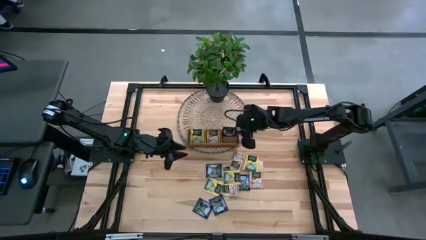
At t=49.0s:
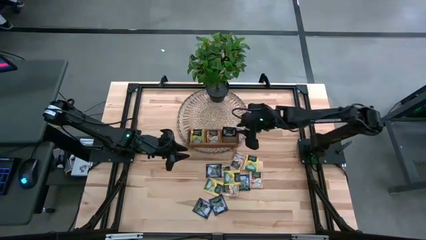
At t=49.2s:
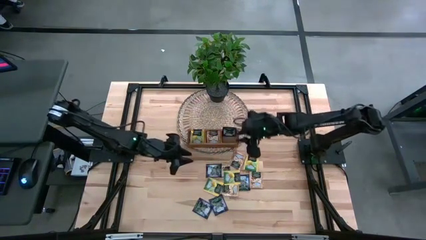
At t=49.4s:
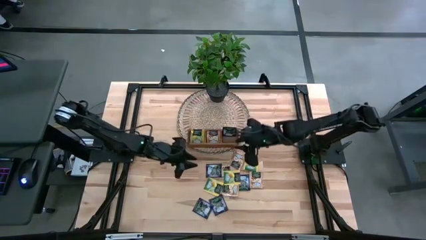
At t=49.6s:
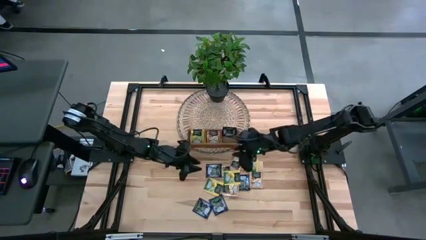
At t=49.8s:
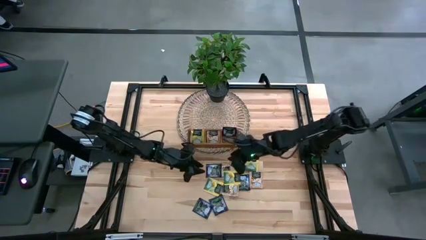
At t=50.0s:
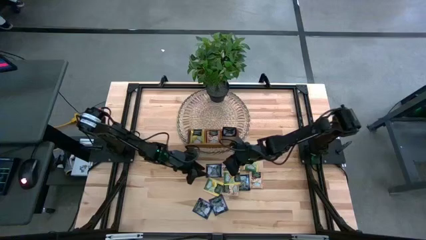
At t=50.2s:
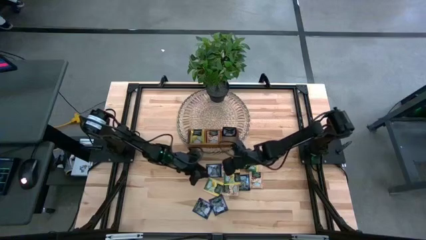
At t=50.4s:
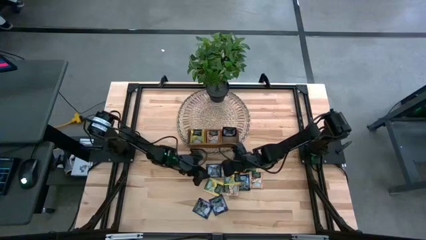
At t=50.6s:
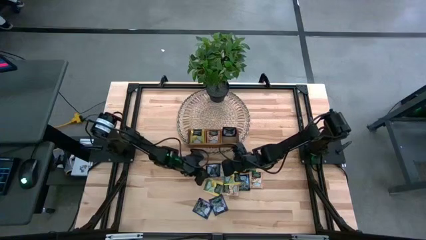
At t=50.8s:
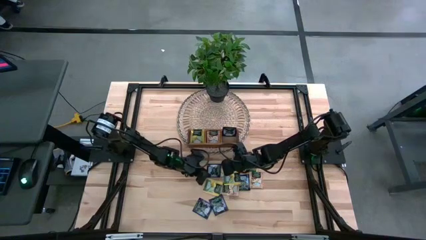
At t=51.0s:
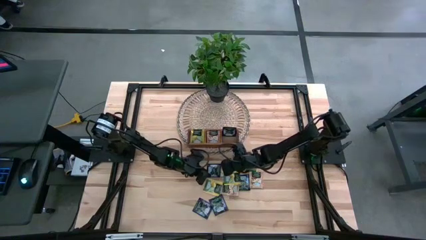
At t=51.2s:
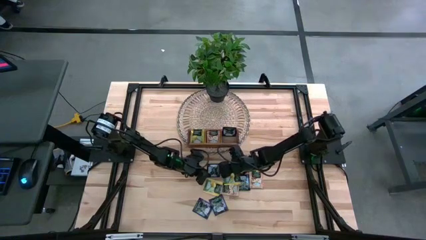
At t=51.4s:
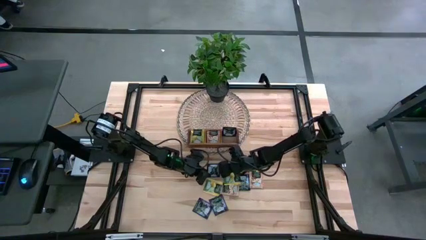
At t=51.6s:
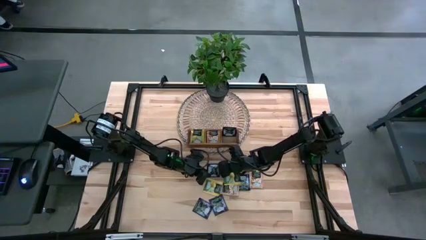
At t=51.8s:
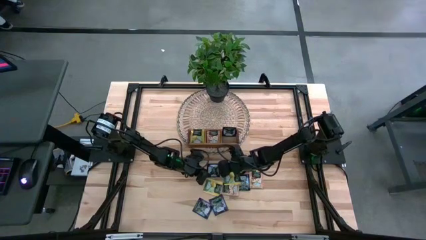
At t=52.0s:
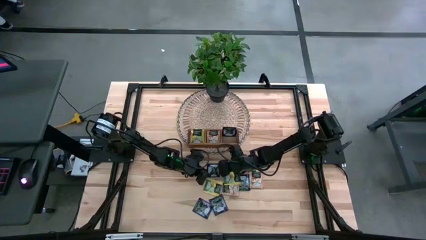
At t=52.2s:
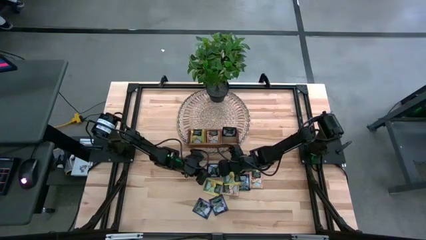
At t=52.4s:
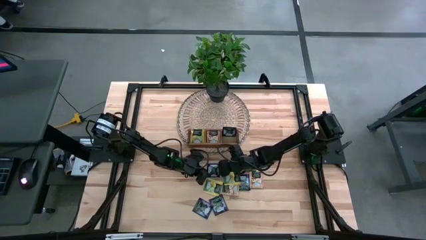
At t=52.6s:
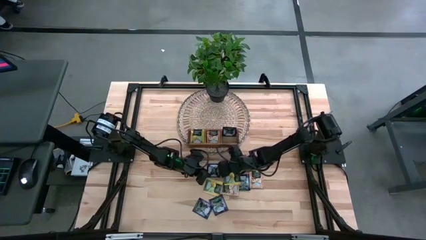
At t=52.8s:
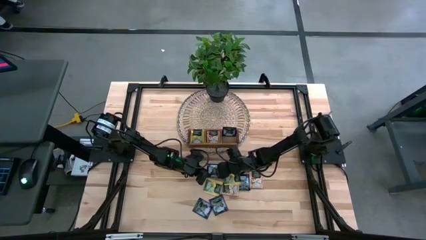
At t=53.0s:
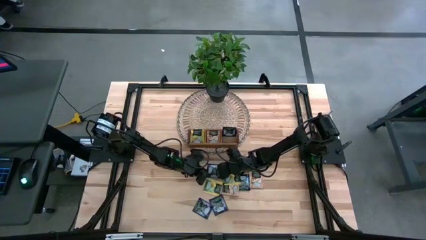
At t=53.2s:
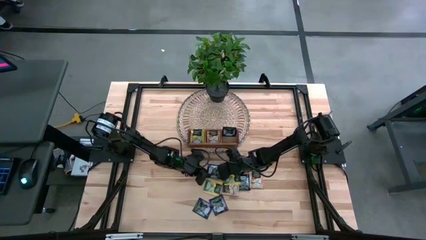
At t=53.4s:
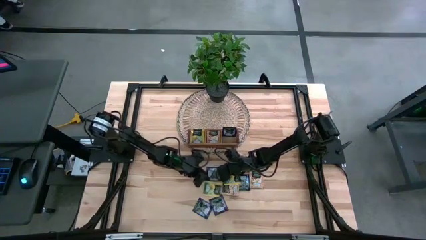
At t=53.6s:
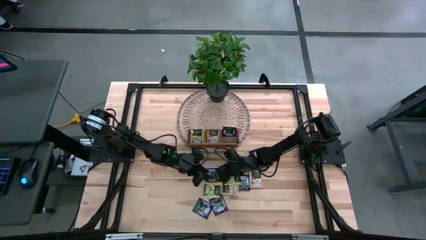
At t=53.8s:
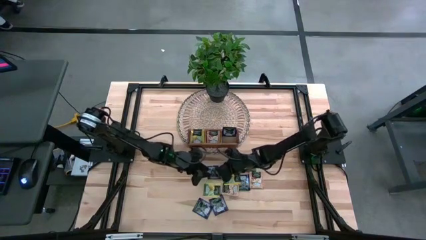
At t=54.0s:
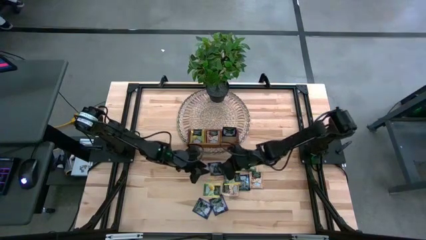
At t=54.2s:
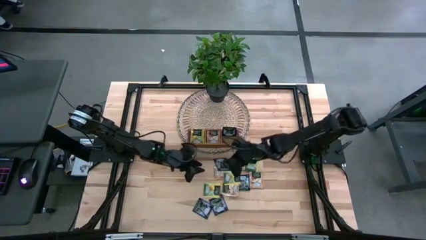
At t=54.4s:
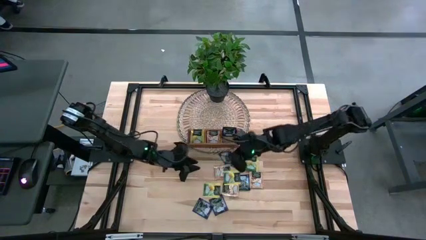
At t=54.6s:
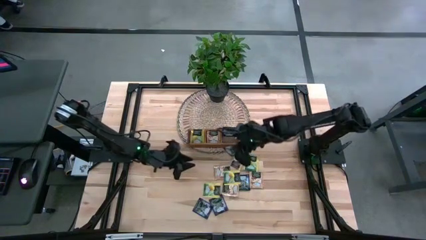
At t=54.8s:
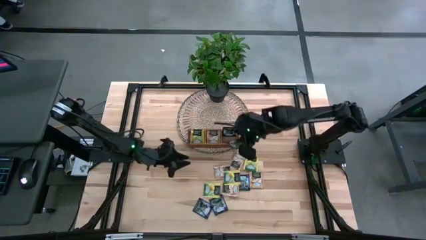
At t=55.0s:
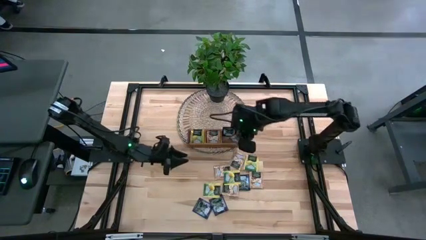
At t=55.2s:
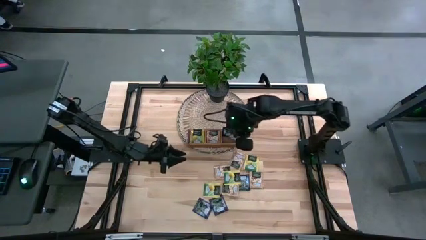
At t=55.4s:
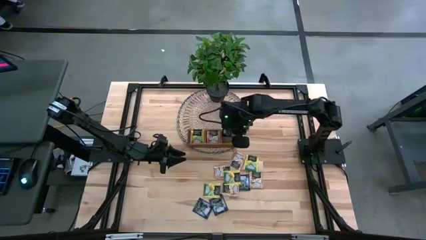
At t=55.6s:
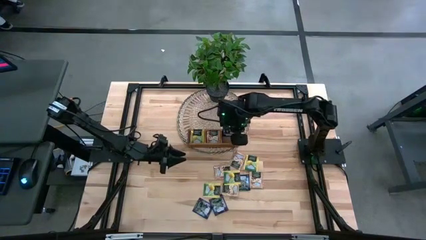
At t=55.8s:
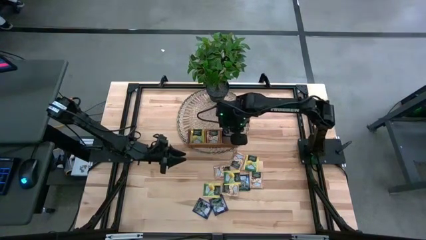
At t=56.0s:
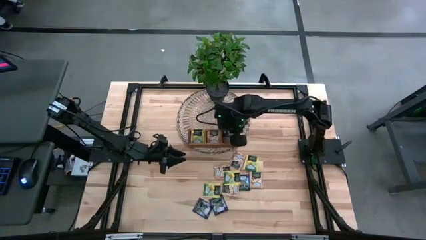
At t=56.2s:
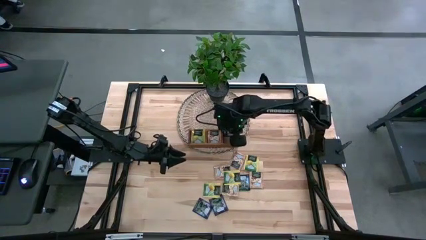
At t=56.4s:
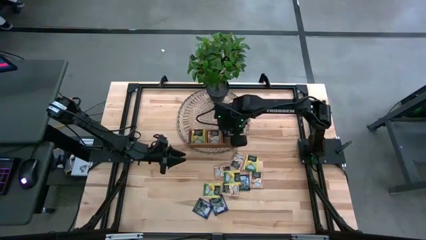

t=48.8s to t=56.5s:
Task: Pick & Place Tea
Put the violet tea bag into the right section of the wooden organizer

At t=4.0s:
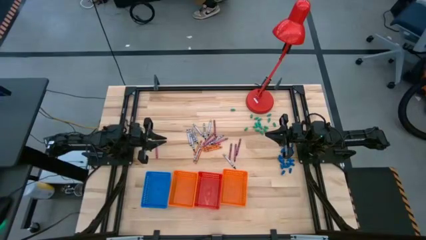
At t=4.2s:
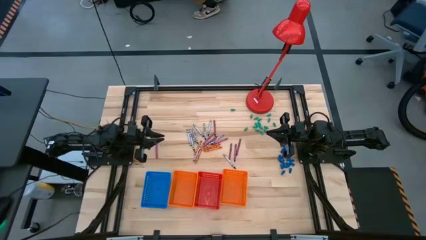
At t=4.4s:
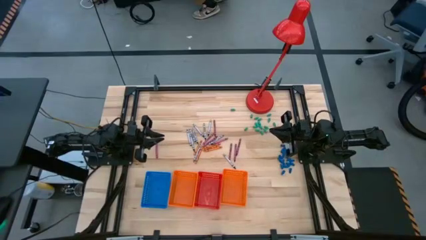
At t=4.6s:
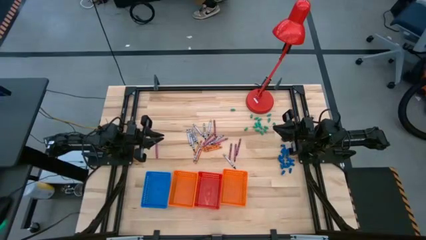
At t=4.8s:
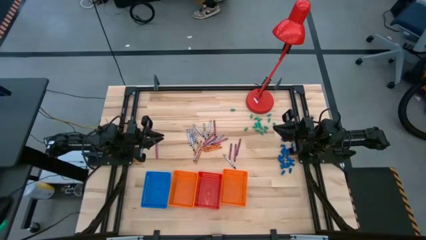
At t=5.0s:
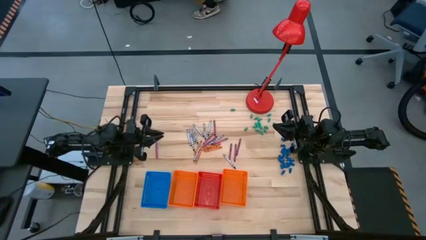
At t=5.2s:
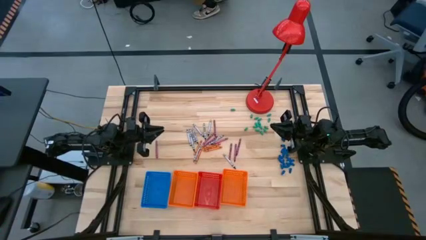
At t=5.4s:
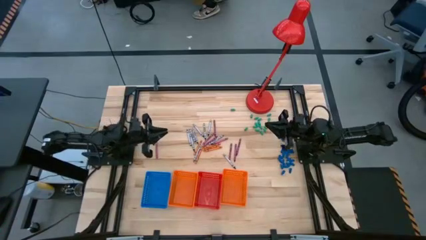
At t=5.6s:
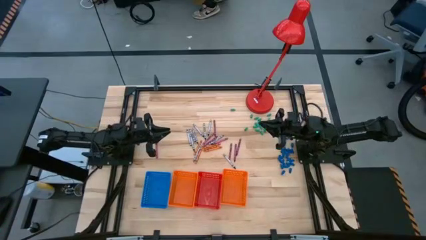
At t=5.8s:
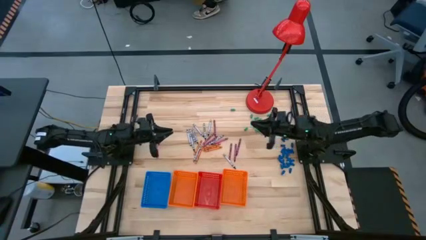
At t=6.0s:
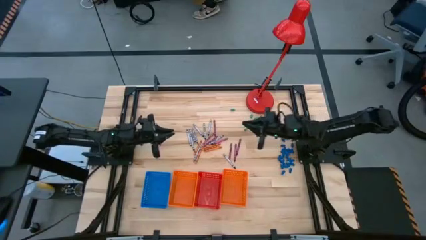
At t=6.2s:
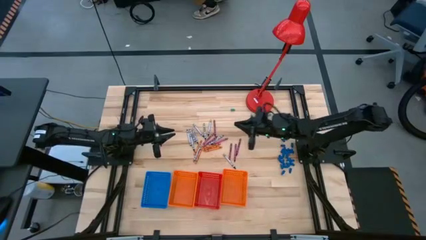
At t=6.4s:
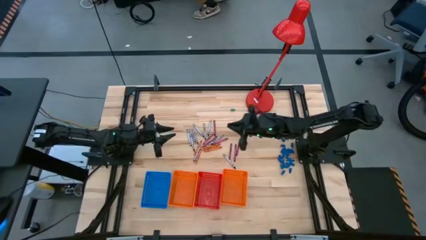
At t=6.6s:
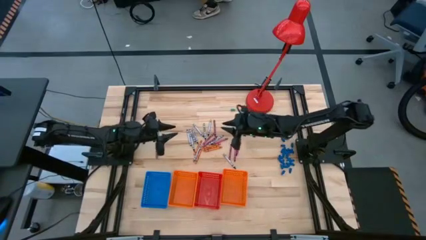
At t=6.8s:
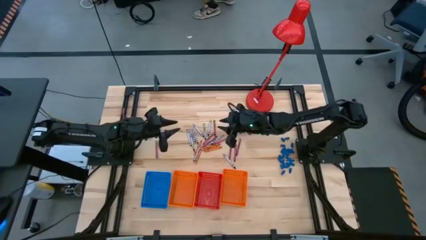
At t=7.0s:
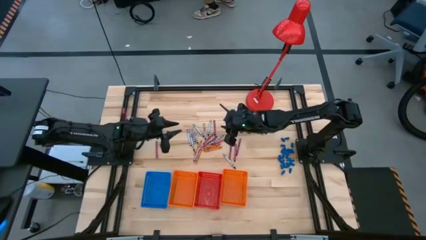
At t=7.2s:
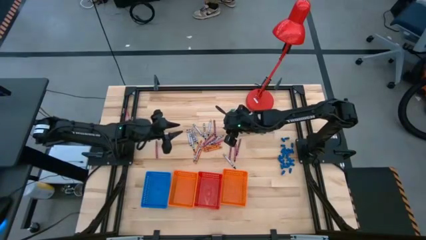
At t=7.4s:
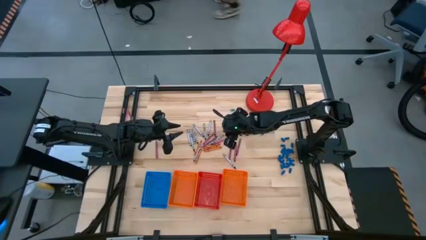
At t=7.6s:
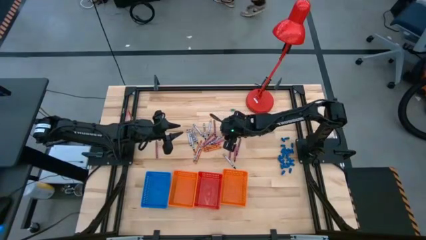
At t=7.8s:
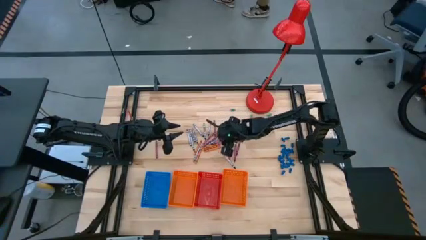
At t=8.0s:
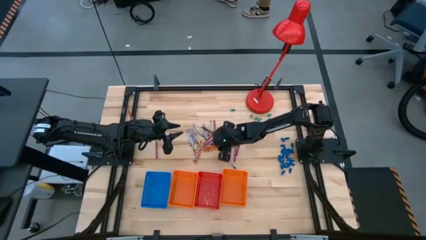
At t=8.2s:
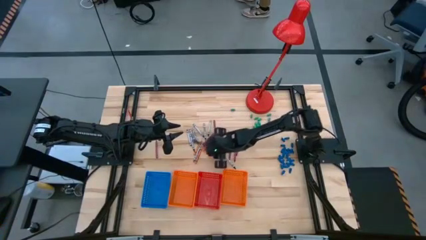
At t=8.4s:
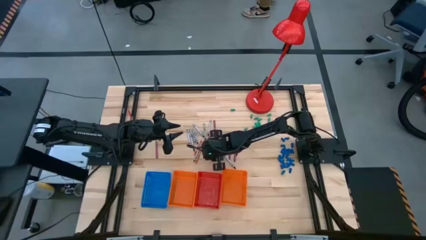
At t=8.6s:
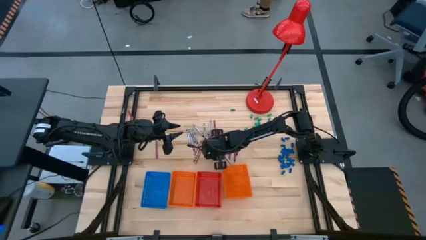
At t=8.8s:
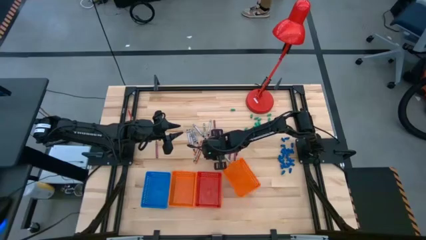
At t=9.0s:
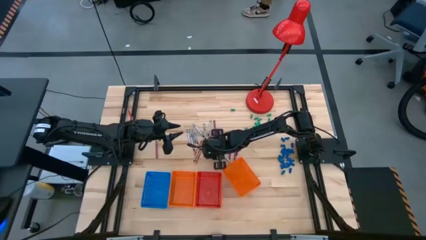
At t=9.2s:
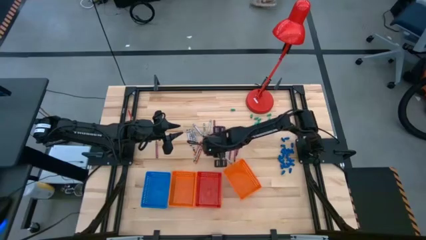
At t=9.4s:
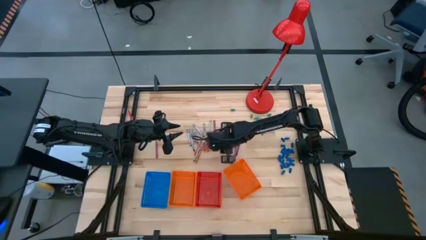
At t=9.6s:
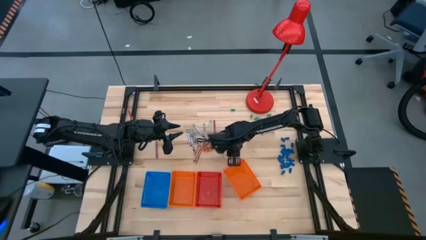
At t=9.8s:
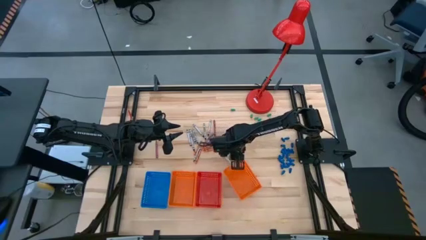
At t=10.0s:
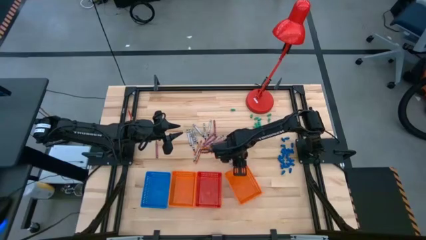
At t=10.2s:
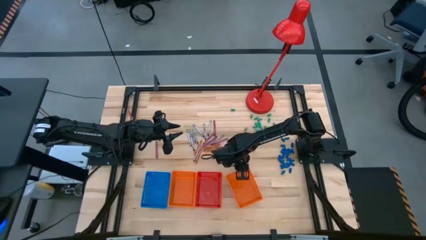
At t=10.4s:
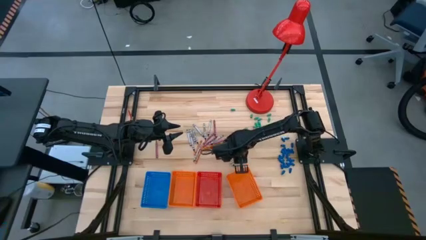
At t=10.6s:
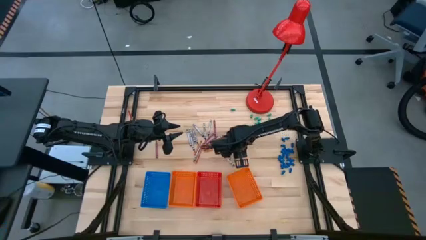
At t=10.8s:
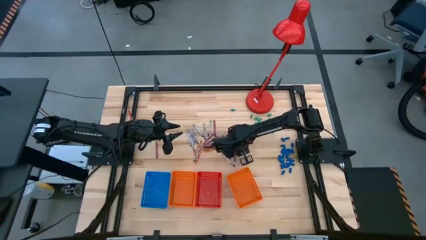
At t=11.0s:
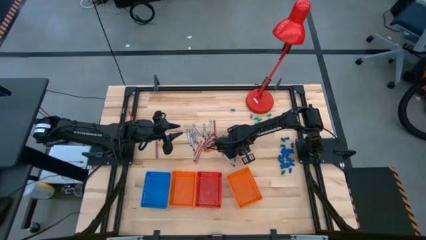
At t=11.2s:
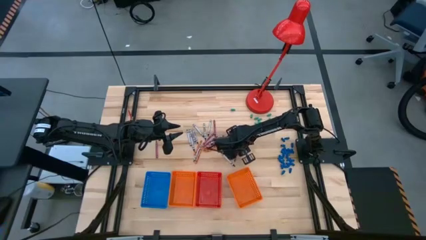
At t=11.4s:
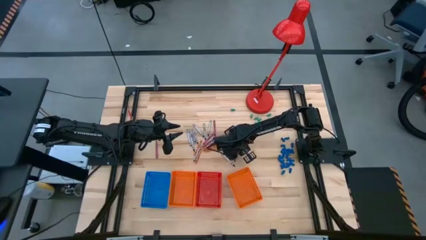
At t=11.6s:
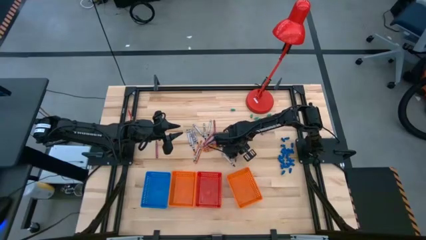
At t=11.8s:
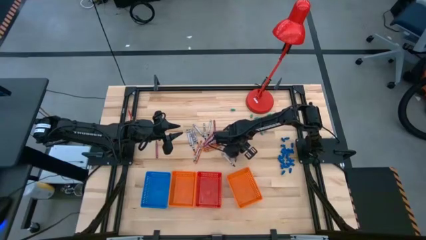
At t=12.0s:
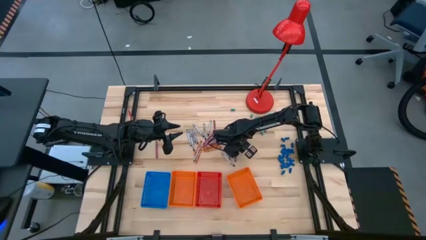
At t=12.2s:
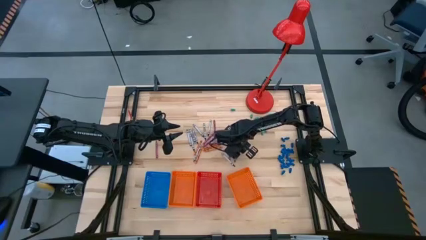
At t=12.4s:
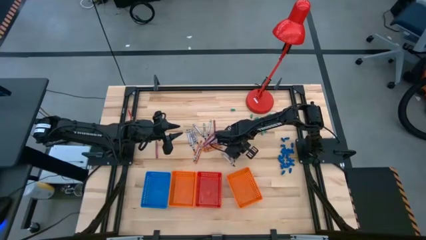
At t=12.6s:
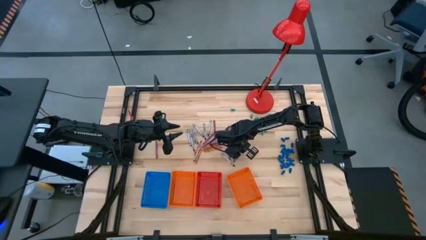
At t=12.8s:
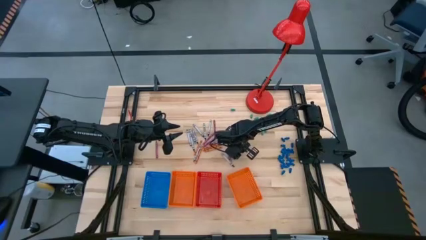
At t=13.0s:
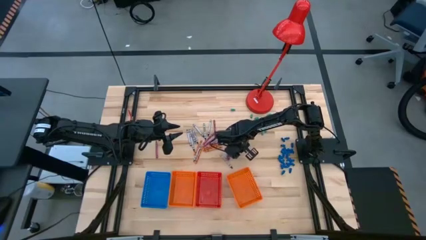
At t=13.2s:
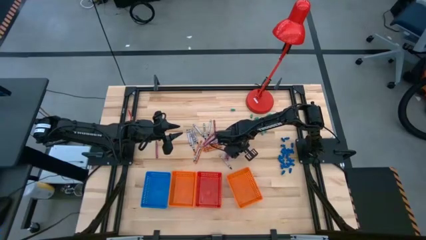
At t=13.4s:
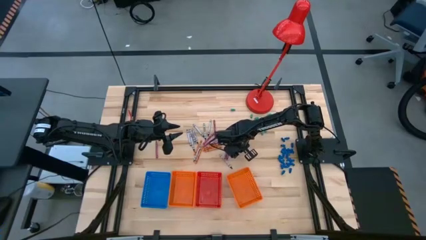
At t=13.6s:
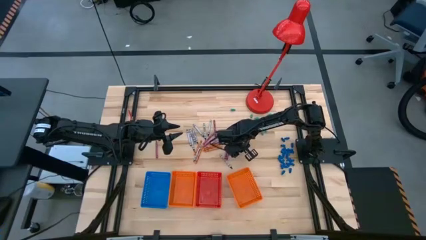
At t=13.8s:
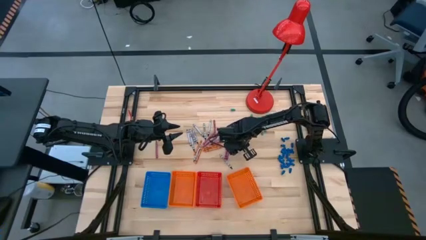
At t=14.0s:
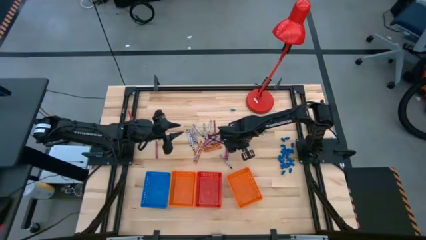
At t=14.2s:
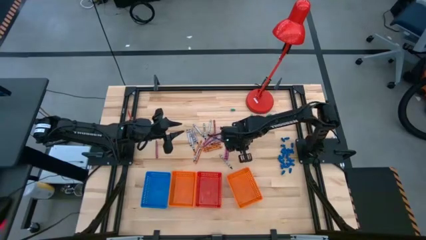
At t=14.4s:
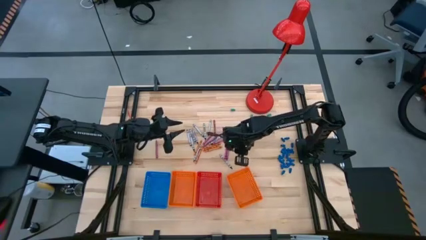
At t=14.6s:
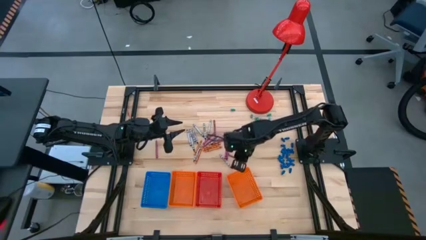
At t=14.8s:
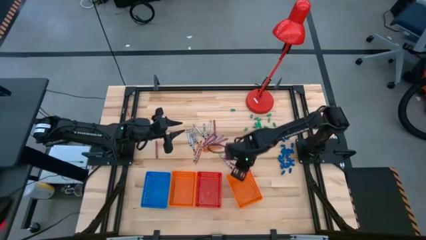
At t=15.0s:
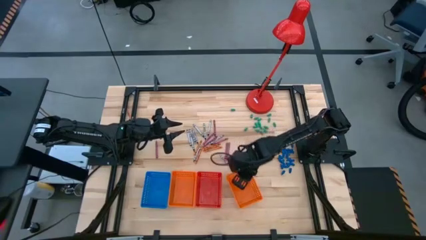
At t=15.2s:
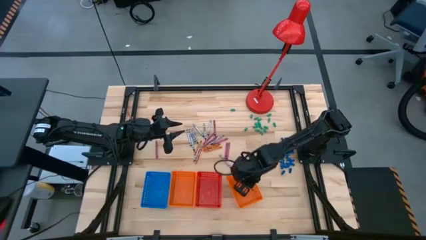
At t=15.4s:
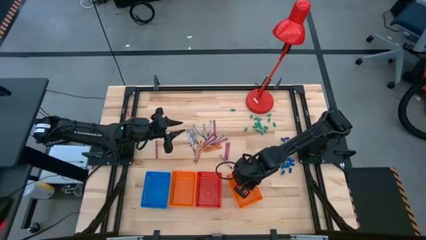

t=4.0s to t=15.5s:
Task: Sort crayons
Put the red crayon into the right orange bin
